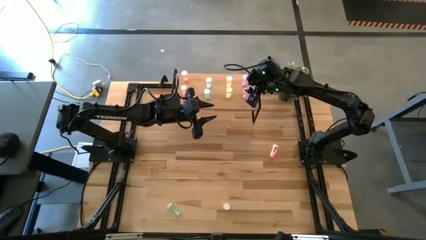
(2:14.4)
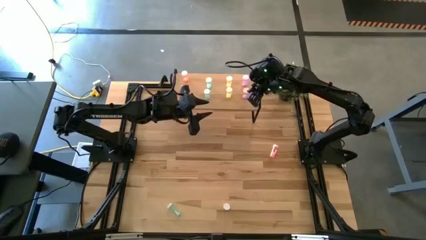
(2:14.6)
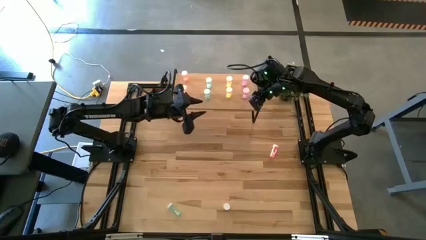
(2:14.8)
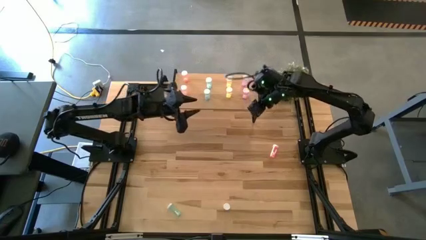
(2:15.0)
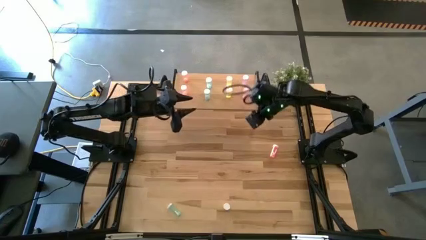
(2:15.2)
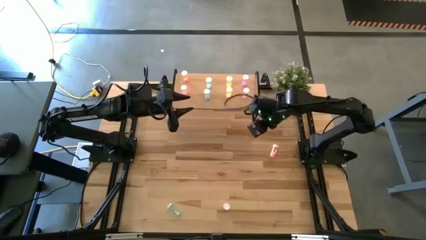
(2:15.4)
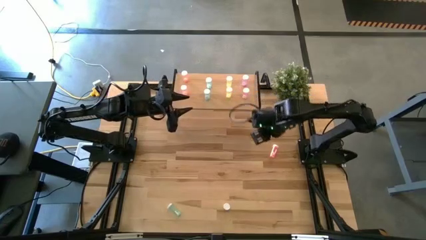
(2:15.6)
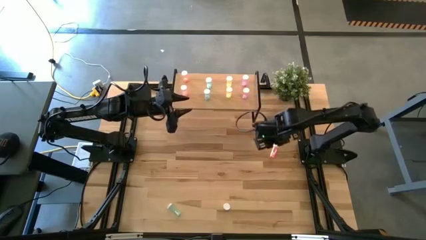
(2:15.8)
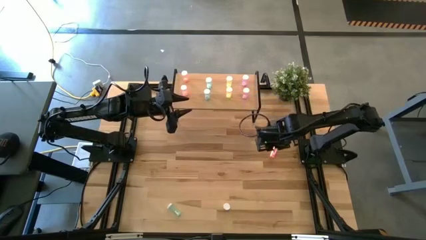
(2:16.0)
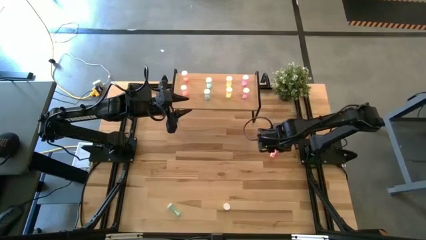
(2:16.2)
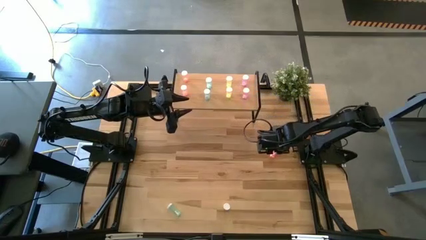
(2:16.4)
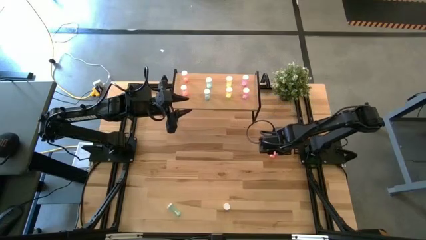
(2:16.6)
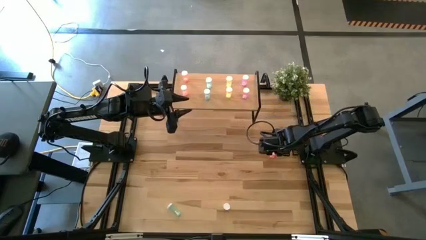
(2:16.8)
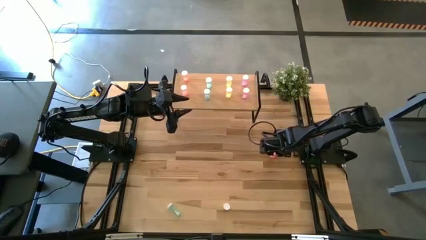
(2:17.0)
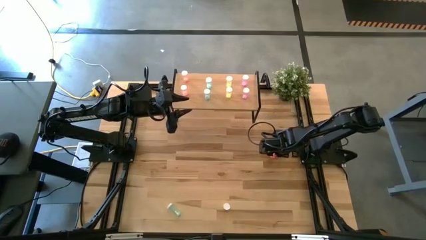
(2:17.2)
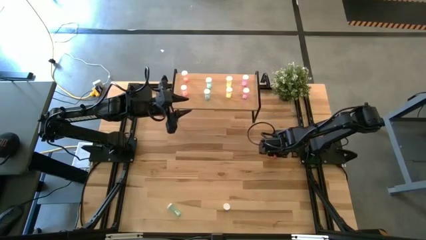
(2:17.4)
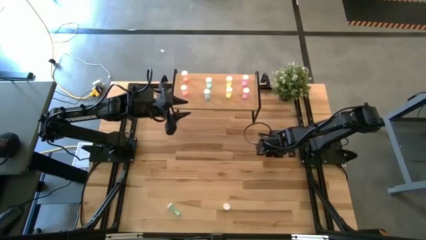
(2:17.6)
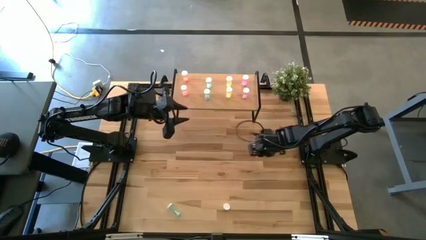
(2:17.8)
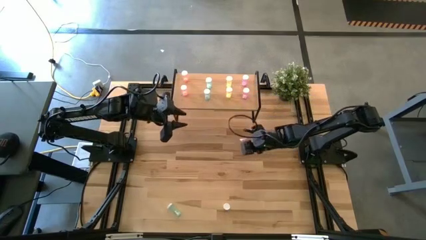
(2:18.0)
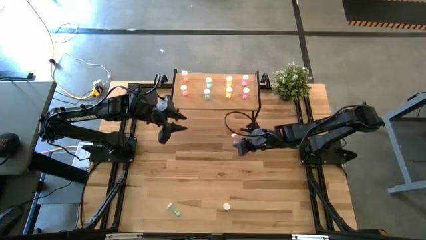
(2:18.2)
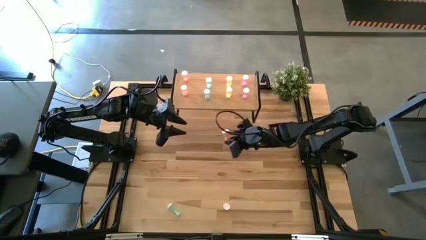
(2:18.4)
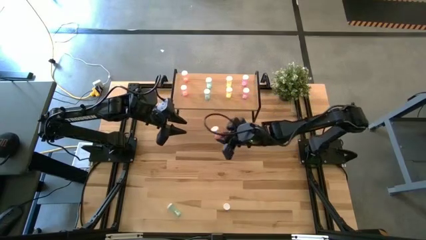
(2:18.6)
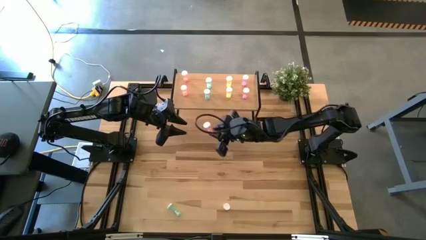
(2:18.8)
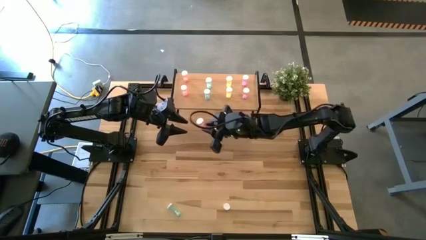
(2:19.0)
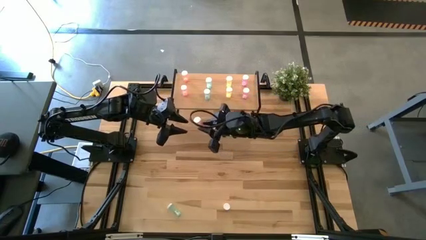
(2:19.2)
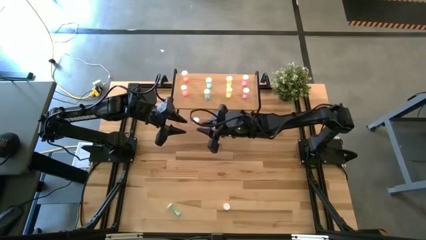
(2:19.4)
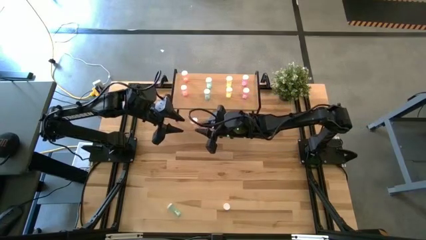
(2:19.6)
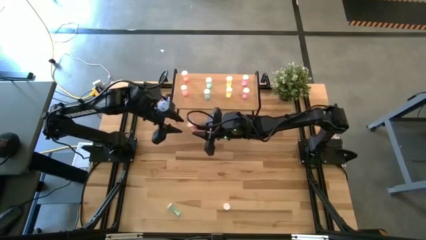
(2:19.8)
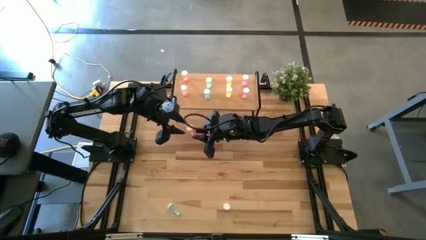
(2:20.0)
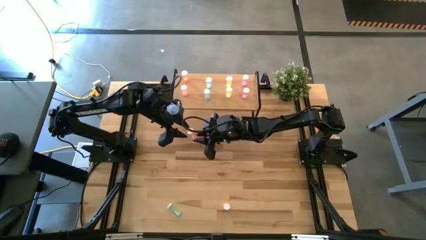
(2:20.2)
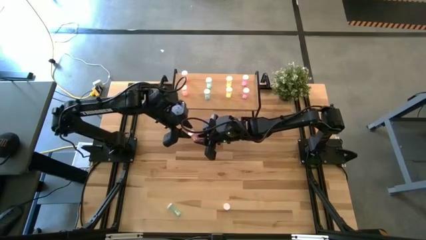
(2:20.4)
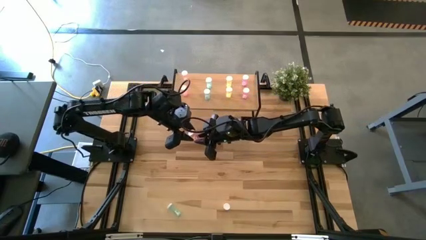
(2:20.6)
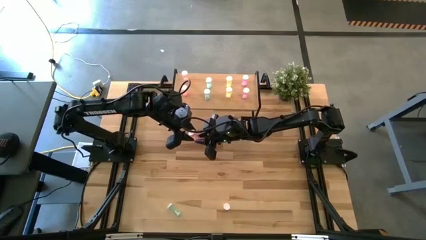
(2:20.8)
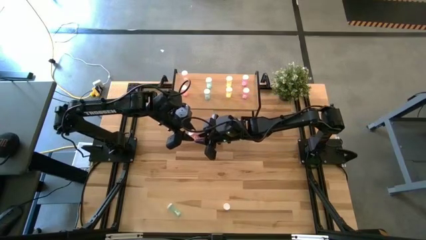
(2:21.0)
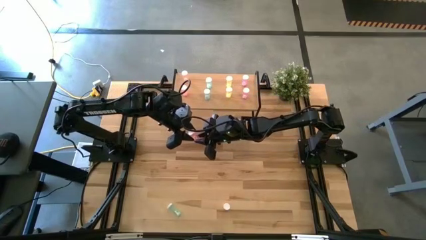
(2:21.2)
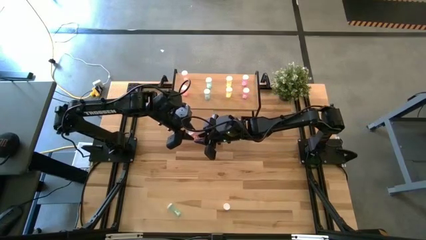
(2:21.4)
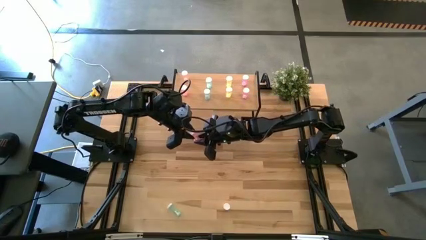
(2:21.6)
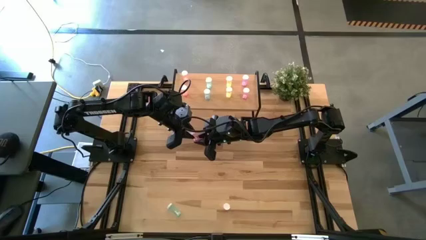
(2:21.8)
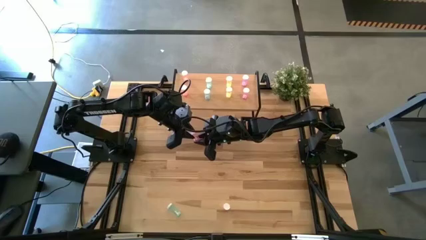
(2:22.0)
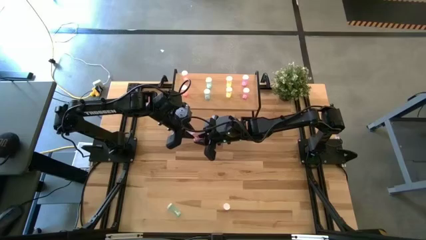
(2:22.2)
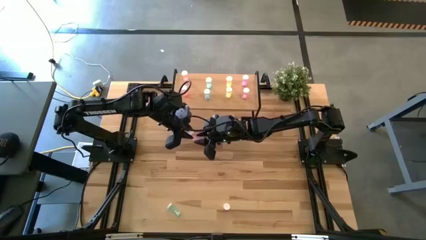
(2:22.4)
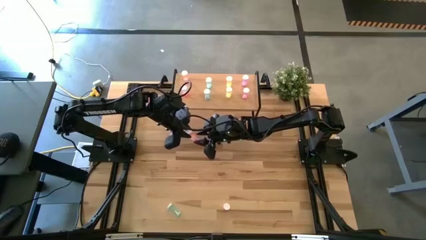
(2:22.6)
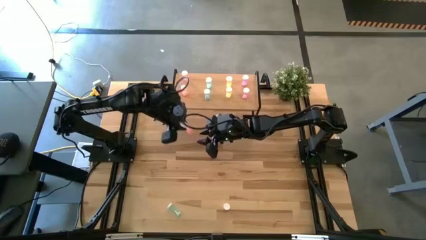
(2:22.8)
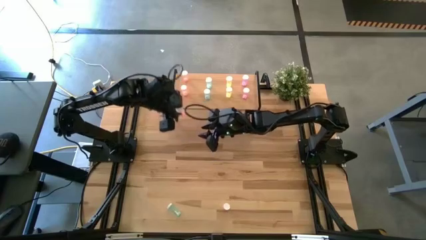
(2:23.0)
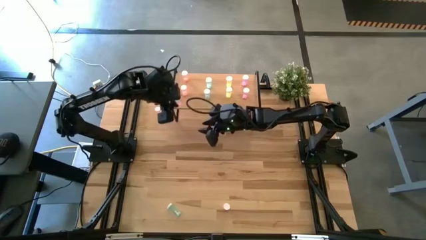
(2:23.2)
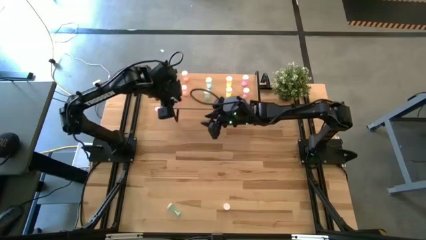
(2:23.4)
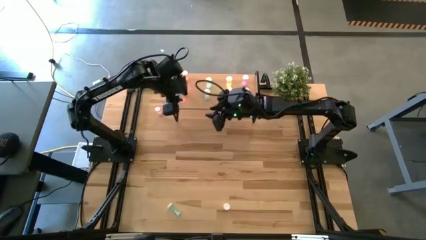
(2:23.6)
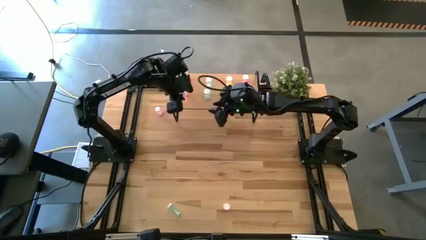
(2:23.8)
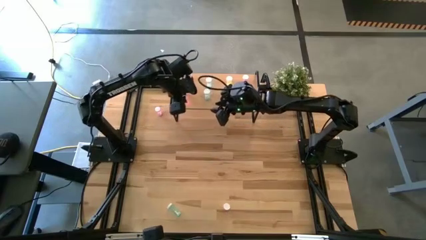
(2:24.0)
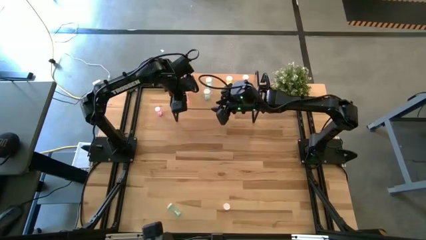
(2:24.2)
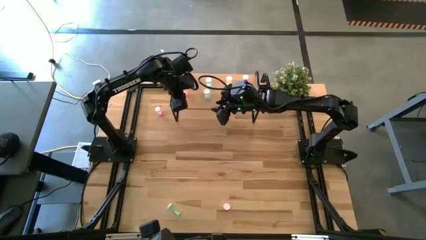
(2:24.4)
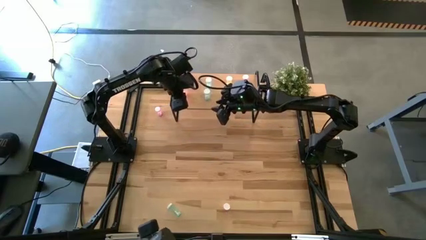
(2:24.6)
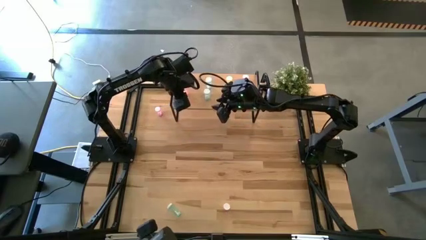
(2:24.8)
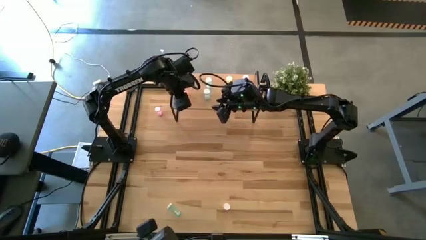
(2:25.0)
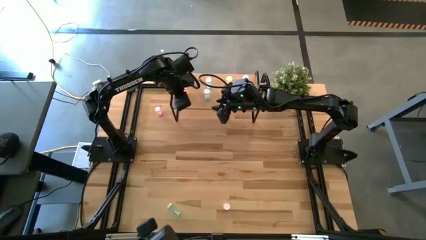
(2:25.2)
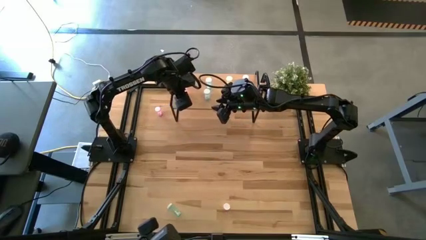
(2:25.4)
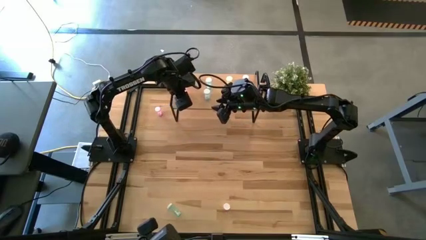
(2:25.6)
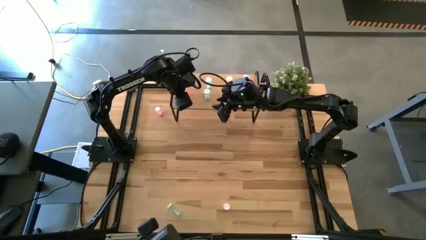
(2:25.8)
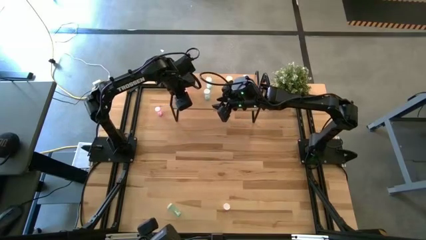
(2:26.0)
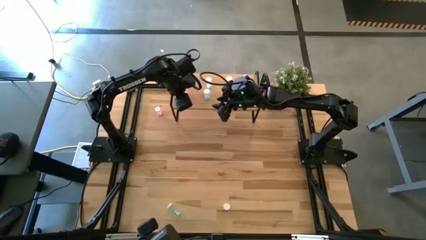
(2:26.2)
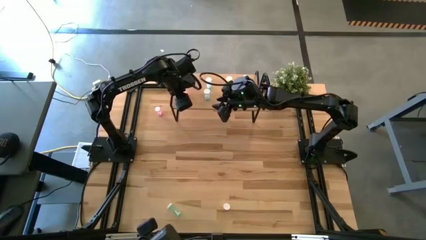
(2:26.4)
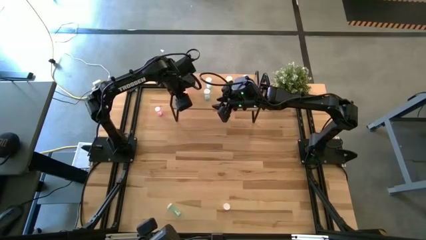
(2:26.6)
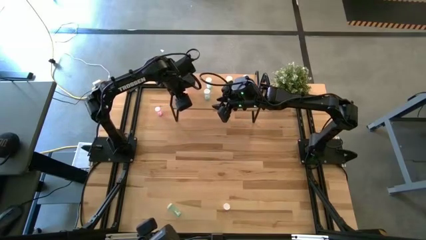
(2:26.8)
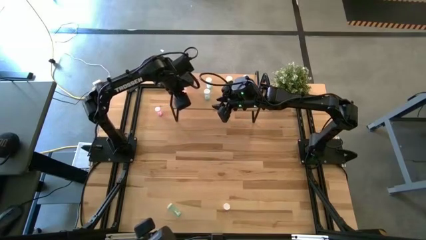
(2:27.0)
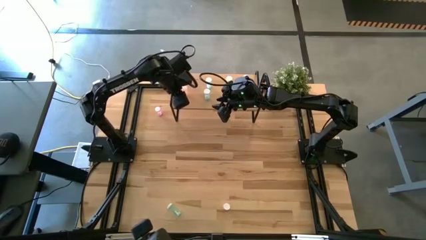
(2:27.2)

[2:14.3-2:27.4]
Task: Pick and place medicine bottles onto shelf by color
Put the orange pill bottle on the shelf aligned with the other orange pill bottle
